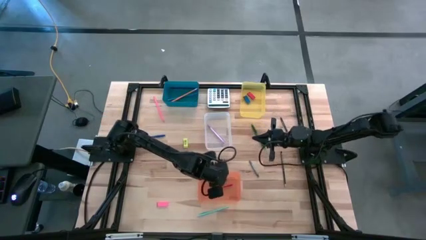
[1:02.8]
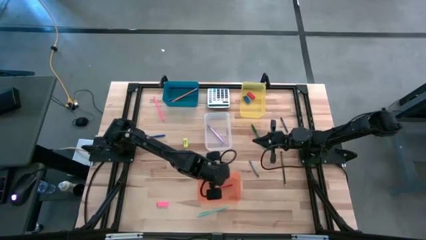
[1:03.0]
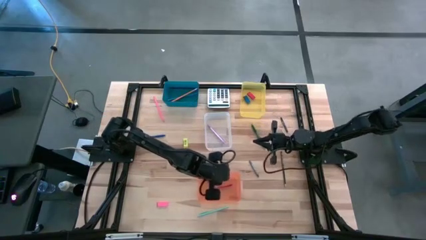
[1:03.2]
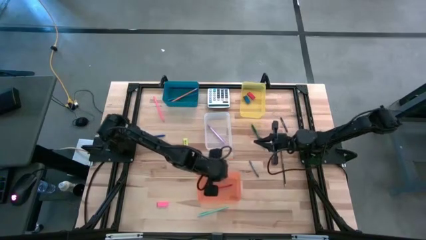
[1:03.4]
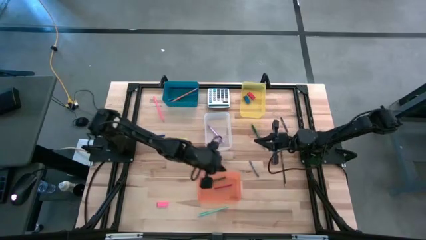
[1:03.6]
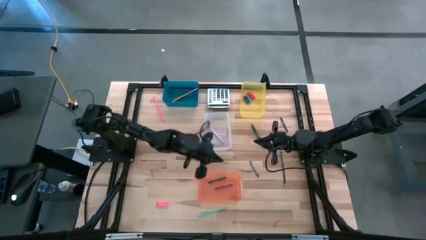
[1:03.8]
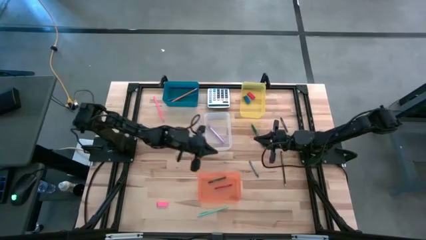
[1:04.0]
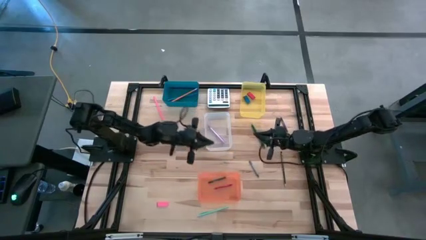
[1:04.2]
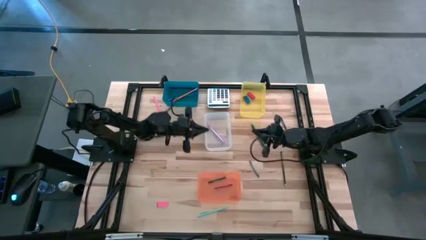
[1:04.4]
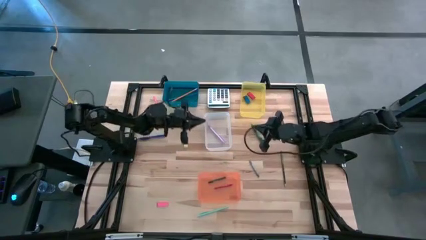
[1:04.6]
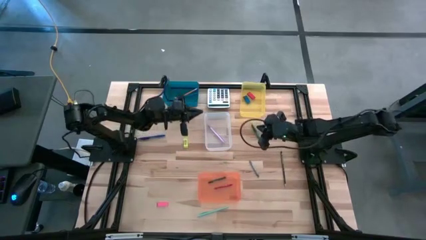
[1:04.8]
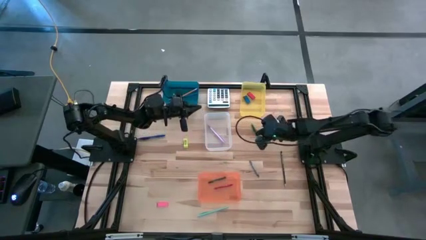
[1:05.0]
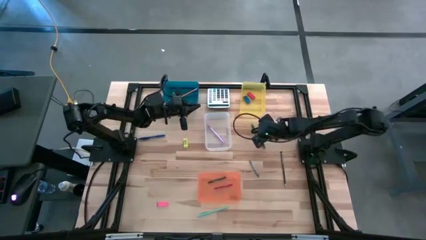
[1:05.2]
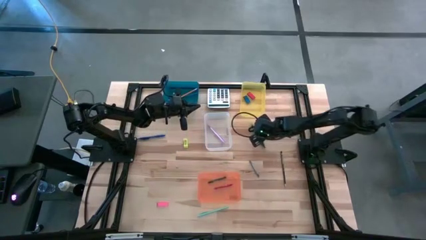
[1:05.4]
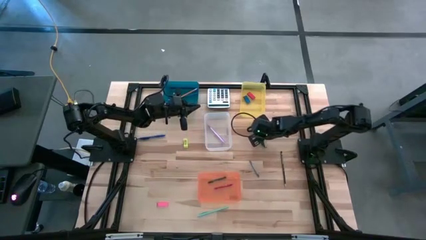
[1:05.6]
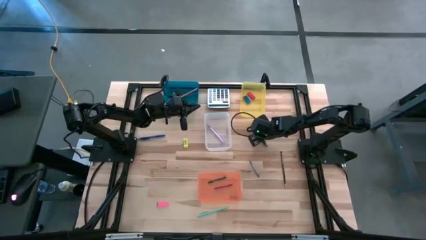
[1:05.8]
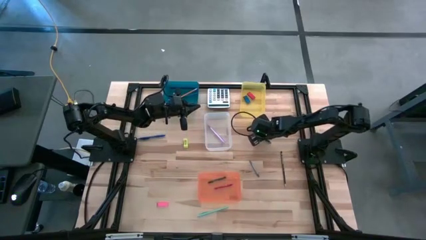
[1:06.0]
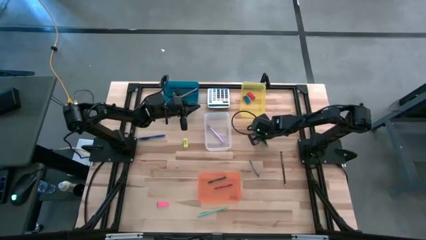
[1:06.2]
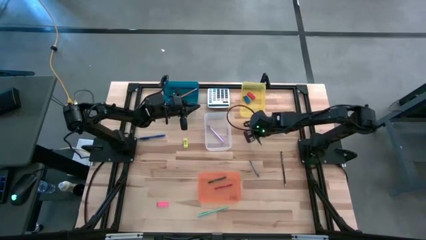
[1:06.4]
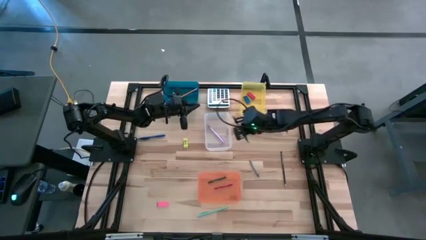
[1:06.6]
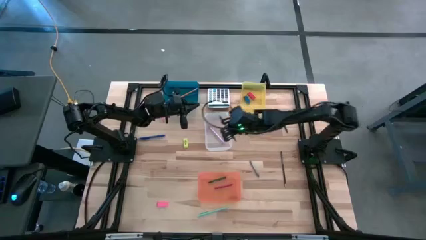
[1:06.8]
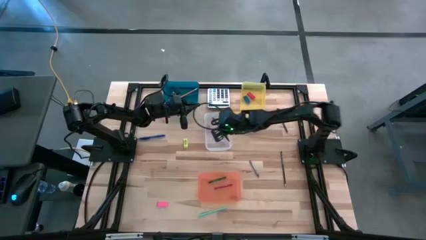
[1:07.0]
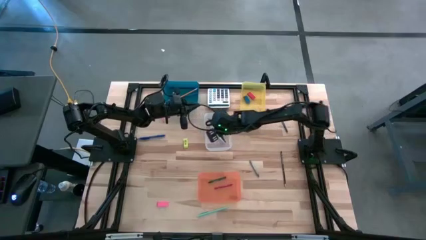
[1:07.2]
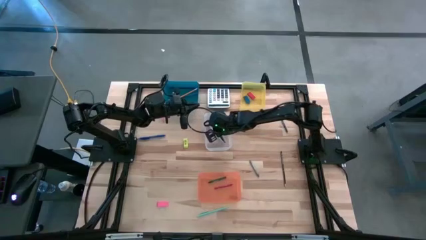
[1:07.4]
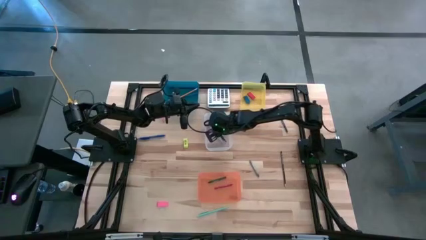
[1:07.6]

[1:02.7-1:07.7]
Task: Sort crayons/erasers/pens/pencils in bins
Put the green pen into the transparent bin

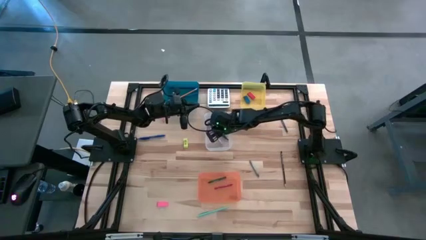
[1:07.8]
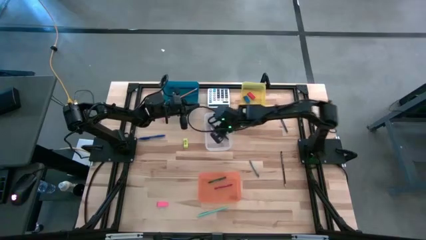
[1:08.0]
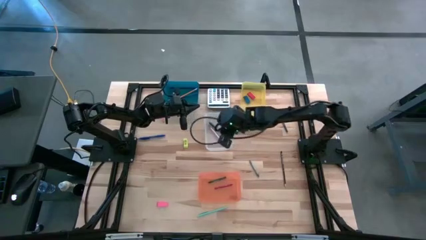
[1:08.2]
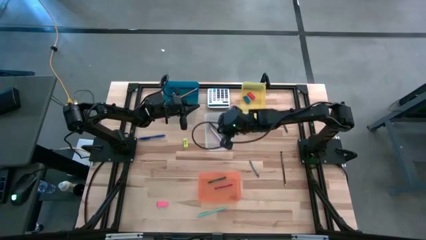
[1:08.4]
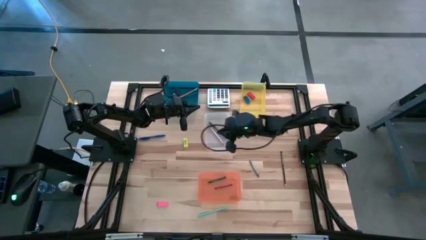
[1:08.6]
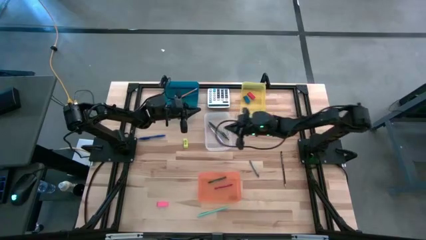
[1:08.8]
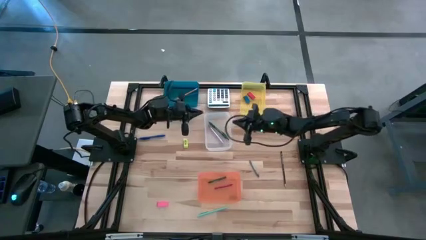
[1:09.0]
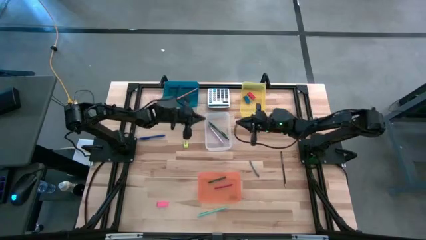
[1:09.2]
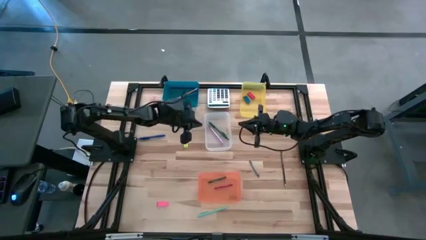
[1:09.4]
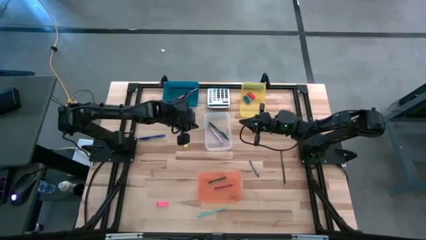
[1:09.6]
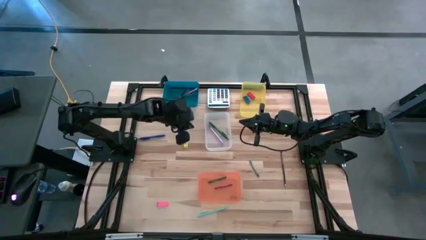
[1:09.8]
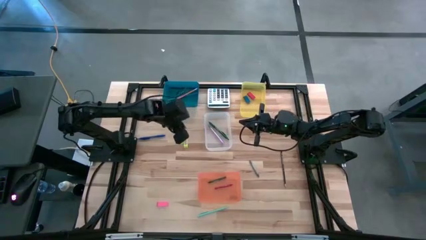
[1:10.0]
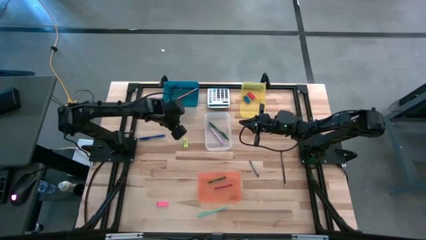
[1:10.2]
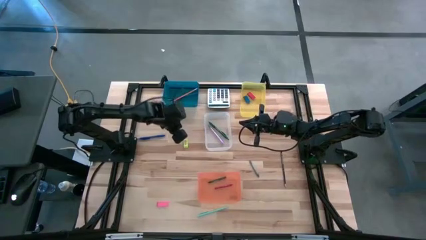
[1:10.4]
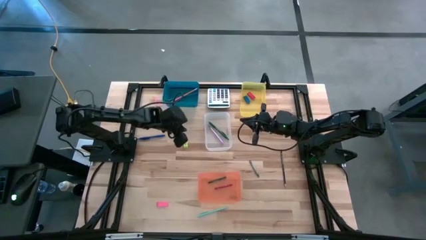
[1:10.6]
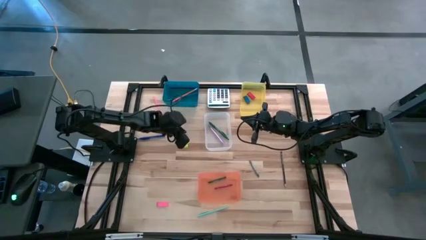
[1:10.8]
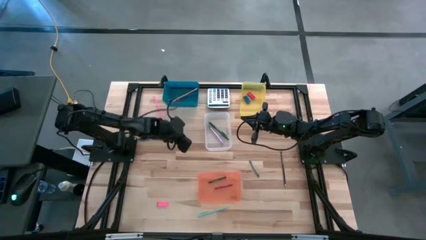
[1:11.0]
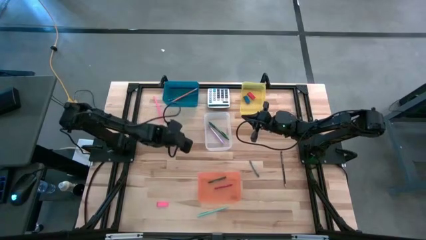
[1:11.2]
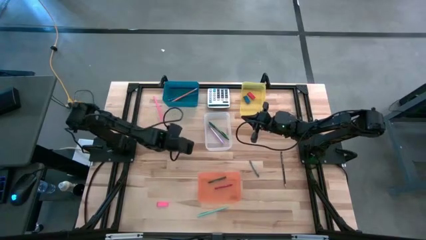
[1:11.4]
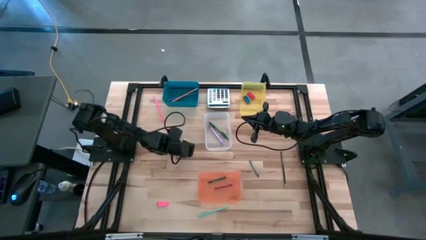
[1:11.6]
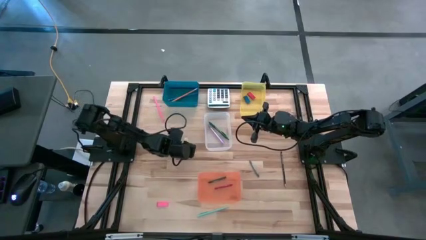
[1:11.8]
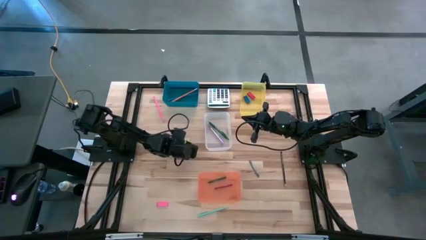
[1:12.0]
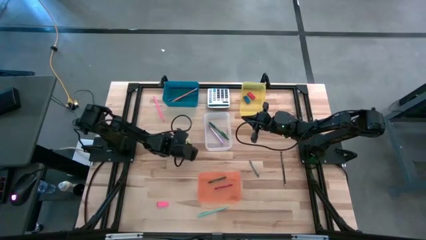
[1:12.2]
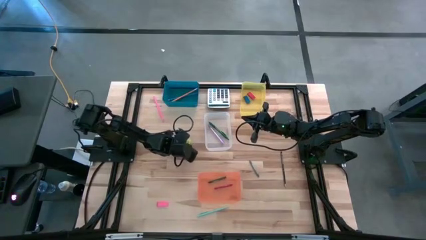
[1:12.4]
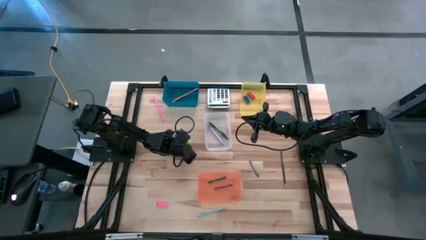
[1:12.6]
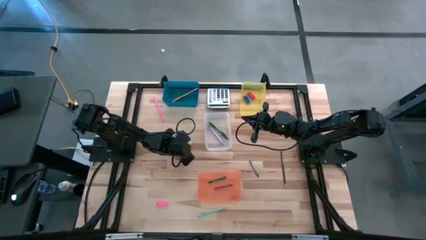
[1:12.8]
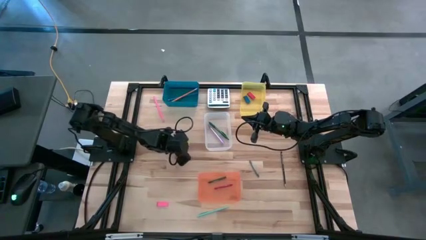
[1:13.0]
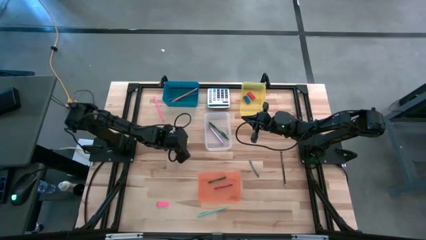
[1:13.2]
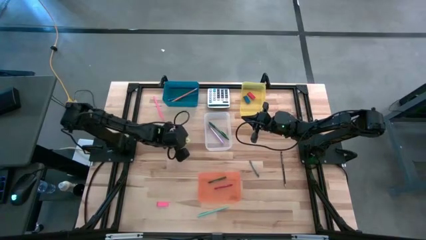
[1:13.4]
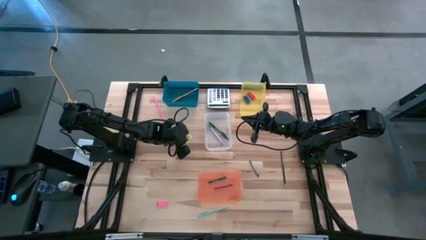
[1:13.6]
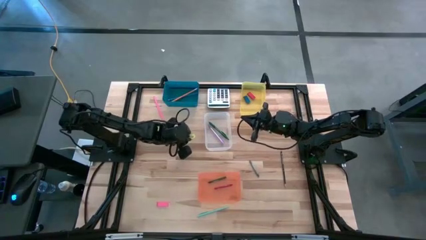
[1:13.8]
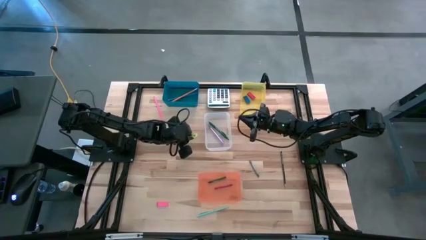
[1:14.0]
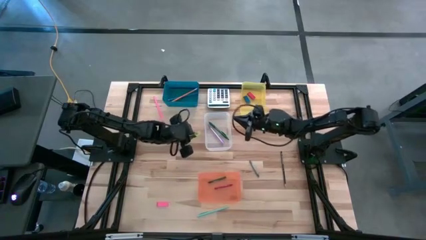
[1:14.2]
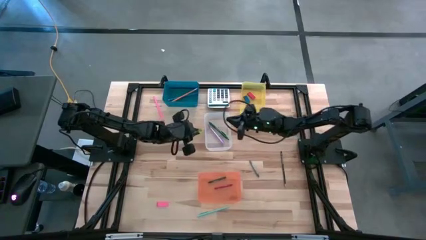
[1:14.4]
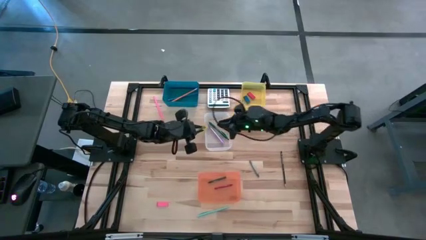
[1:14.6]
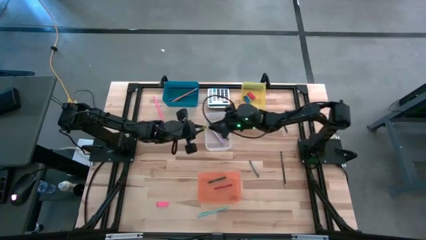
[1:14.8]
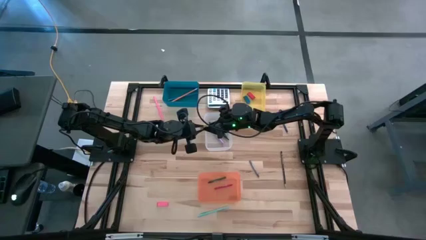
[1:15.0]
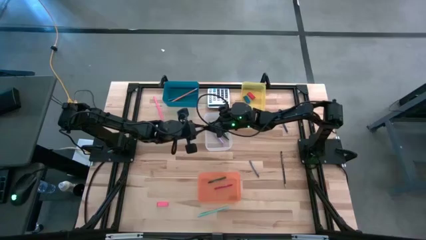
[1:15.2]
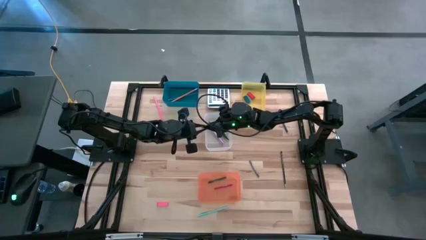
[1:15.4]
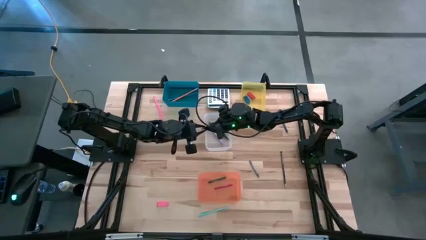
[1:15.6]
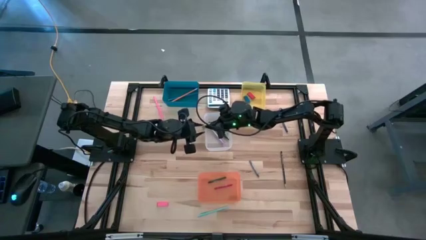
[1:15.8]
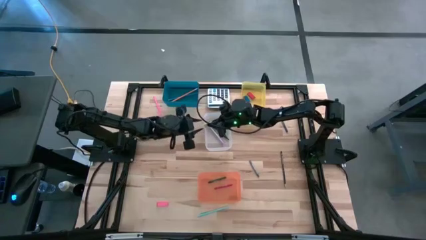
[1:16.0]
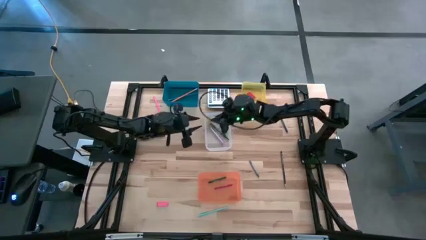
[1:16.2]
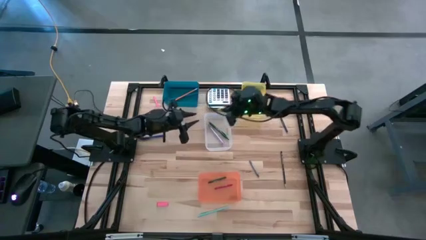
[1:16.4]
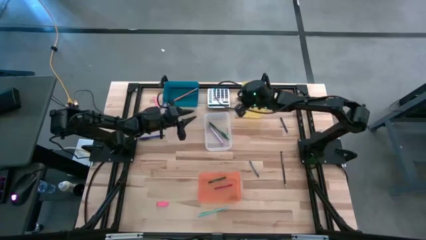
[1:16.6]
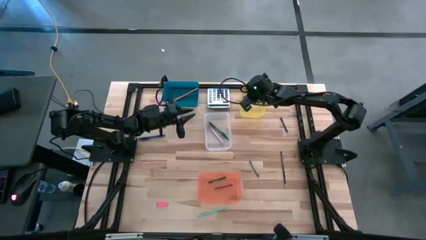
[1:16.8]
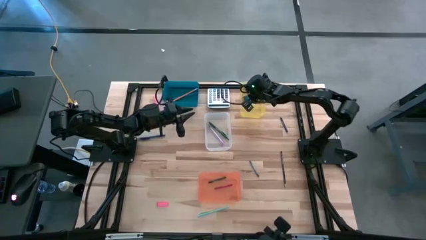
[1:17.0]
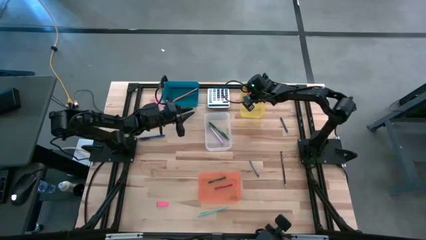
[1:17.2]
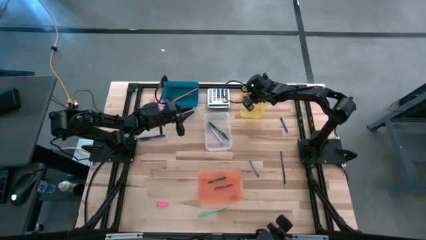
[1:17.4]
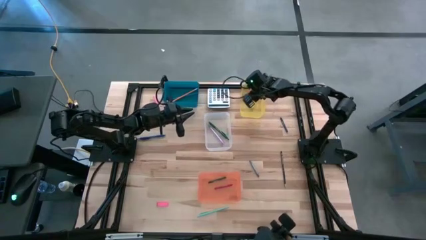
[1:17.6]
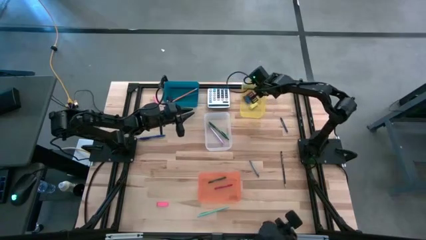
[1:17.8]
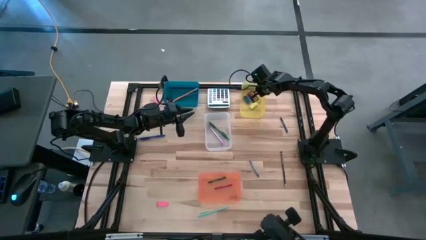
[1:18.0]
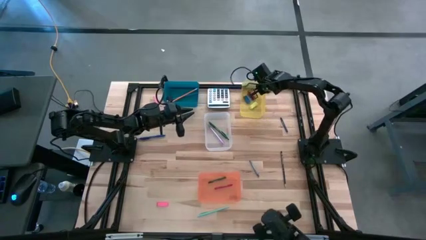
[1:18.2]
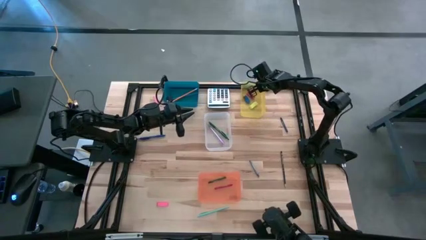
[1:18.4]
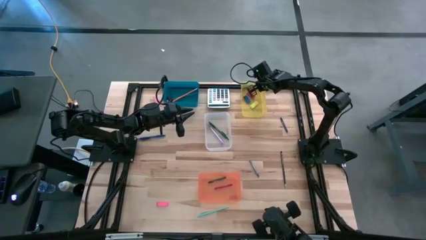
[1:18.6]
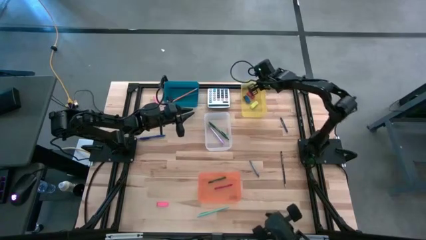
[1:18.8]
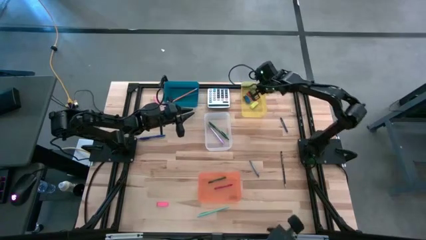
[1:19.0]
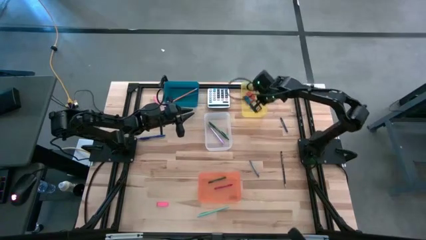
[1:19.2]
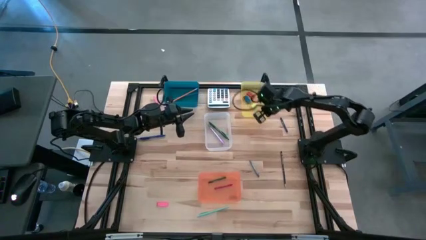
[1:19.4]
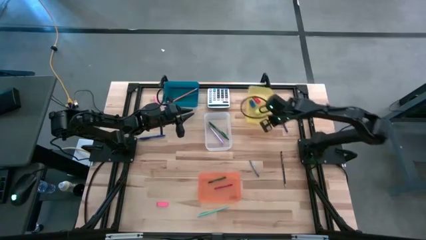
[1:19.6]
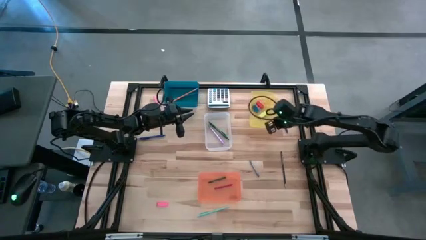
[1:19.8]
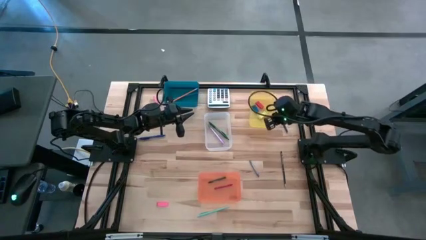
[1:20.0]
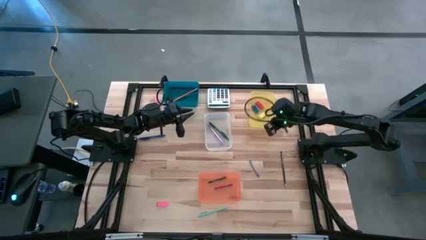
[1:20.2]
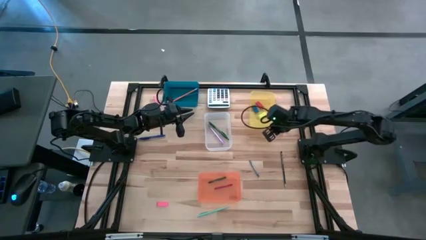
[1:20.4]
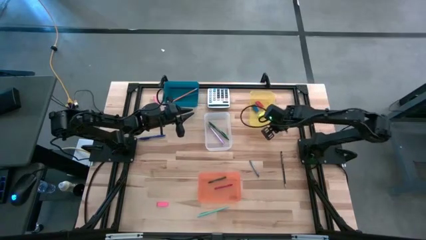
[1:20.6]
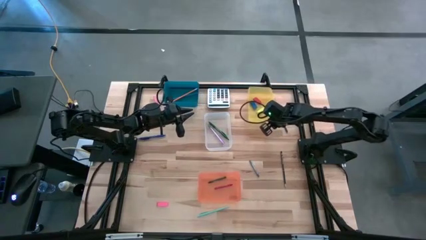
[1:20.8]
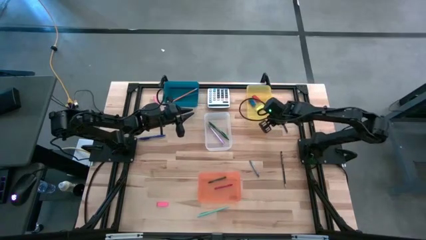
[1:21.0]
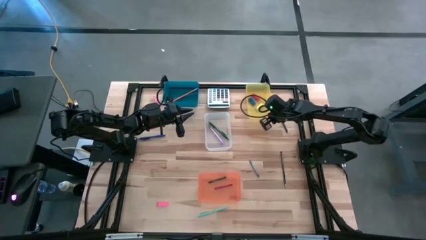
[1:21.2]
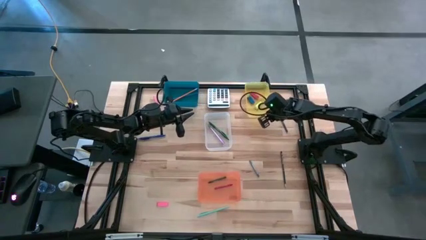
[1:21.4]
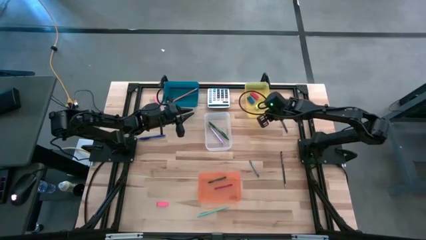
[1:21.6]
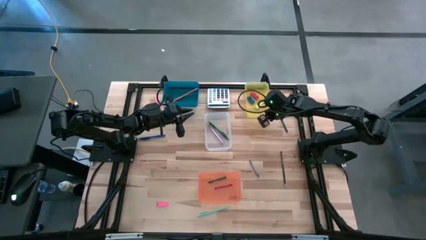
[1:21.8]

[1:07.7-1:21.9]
Put the yellow eraser into the yellow bin
